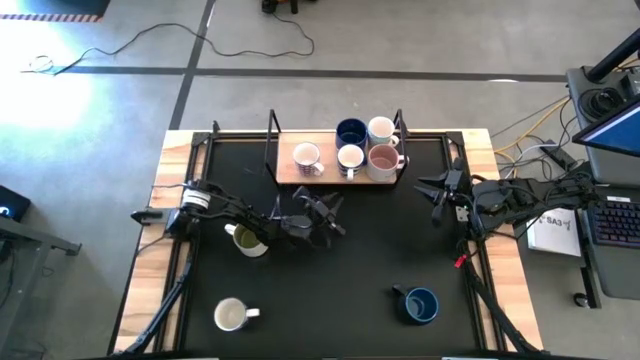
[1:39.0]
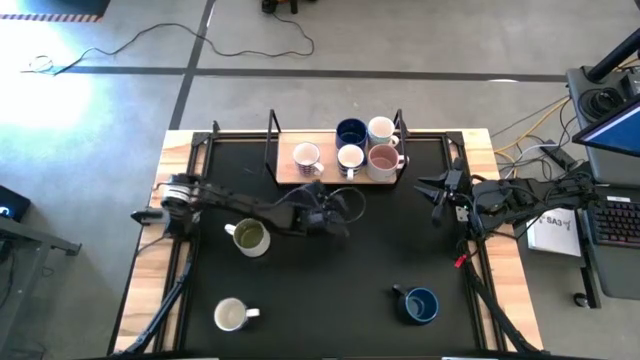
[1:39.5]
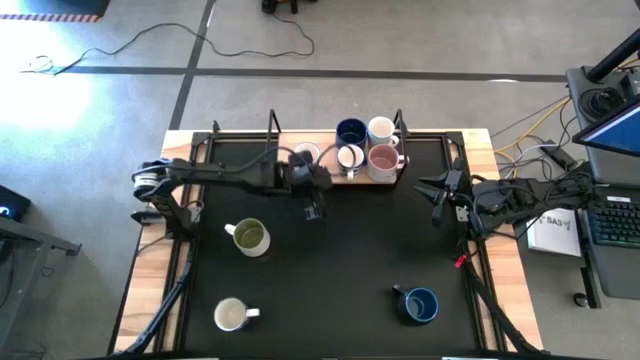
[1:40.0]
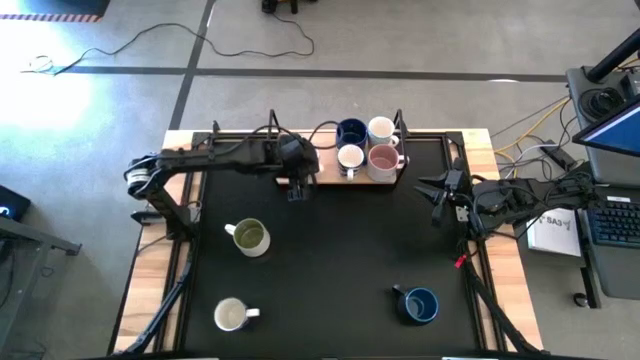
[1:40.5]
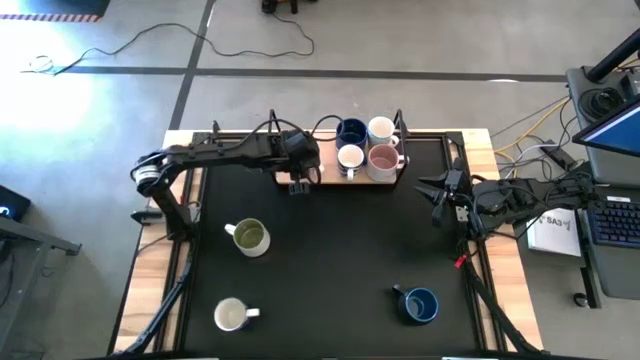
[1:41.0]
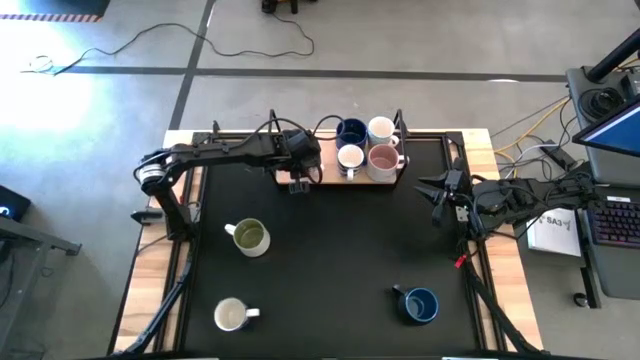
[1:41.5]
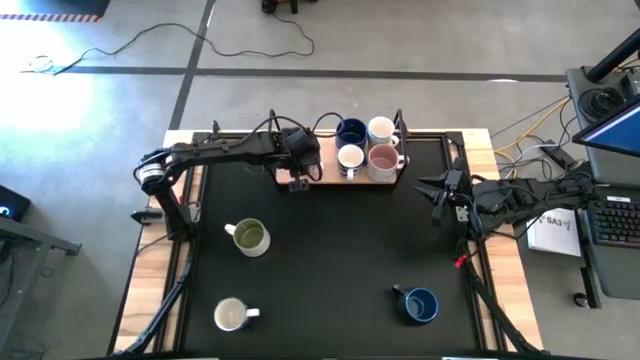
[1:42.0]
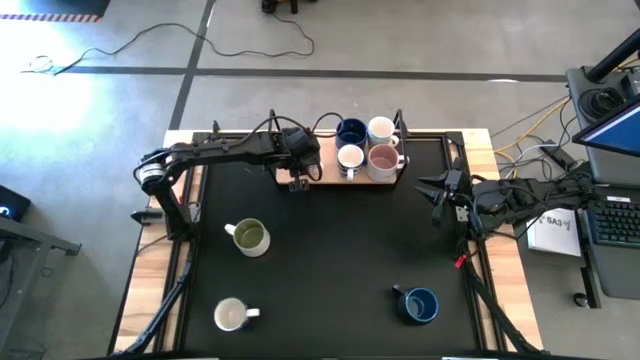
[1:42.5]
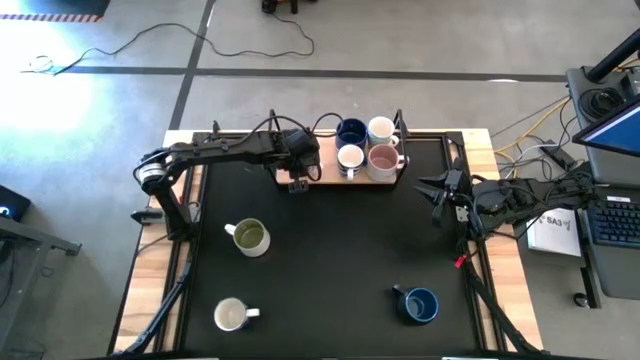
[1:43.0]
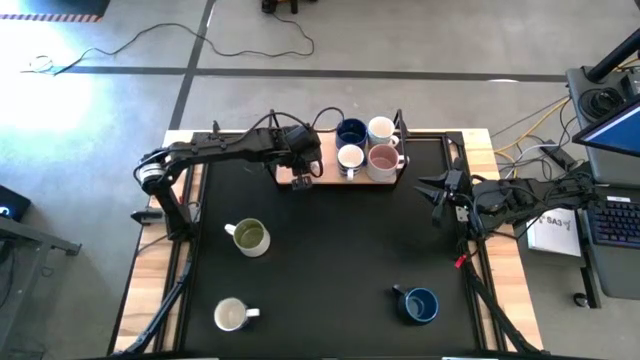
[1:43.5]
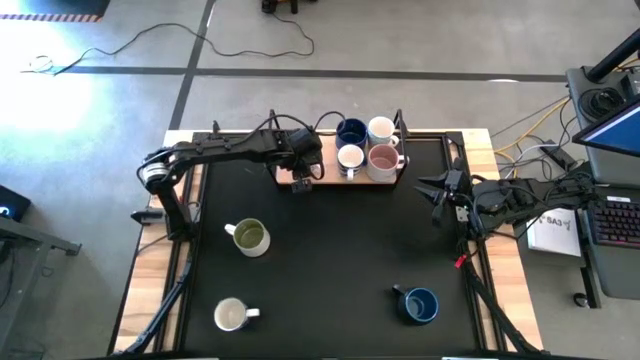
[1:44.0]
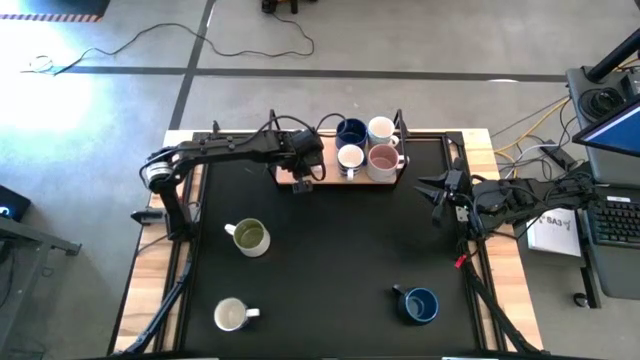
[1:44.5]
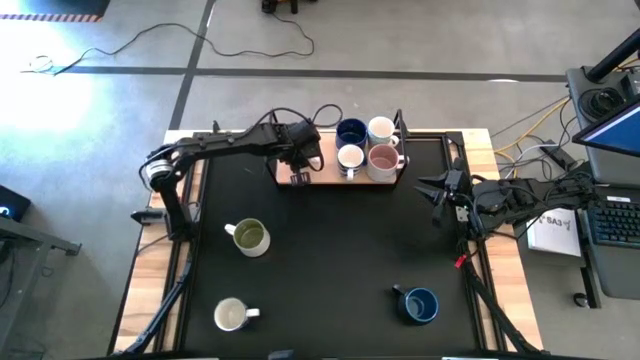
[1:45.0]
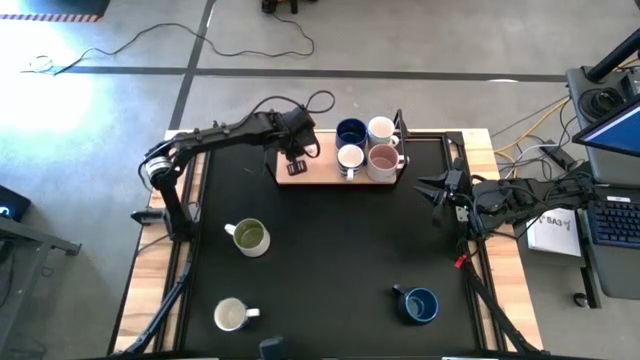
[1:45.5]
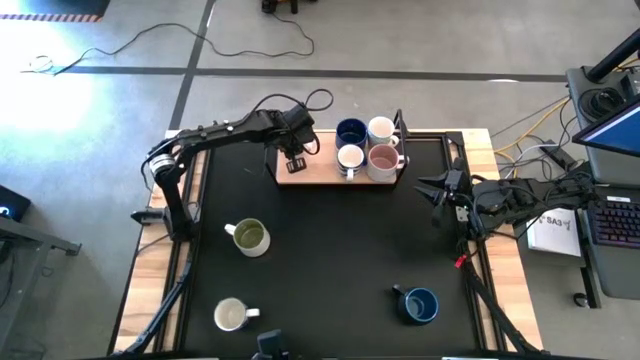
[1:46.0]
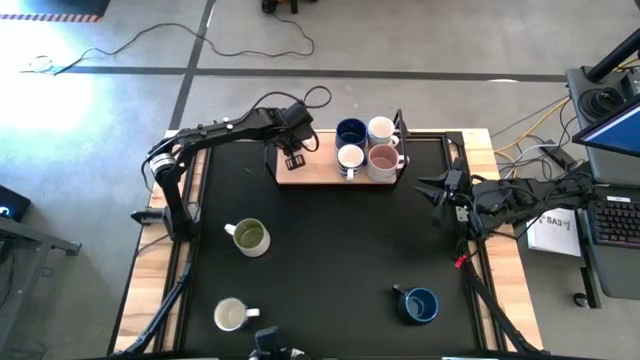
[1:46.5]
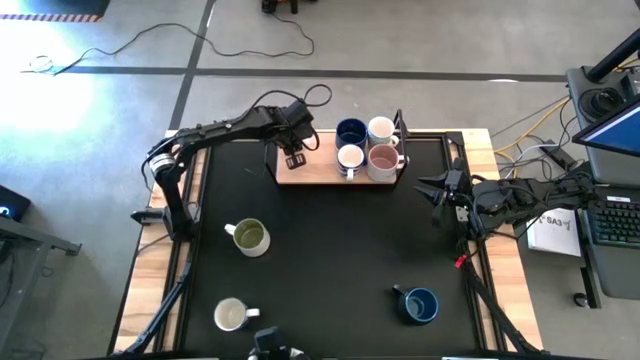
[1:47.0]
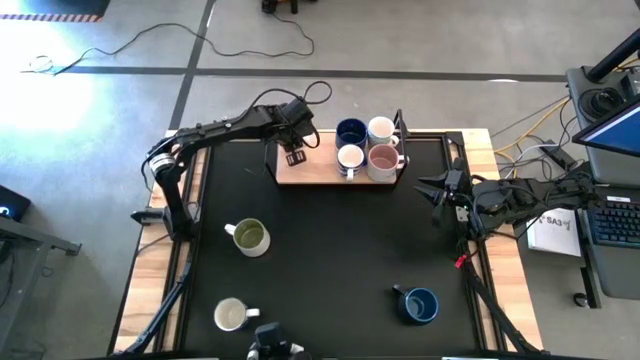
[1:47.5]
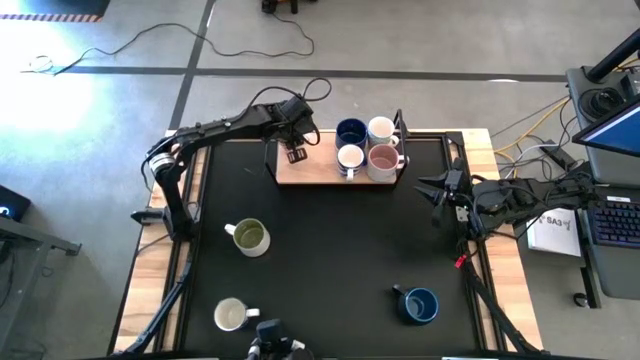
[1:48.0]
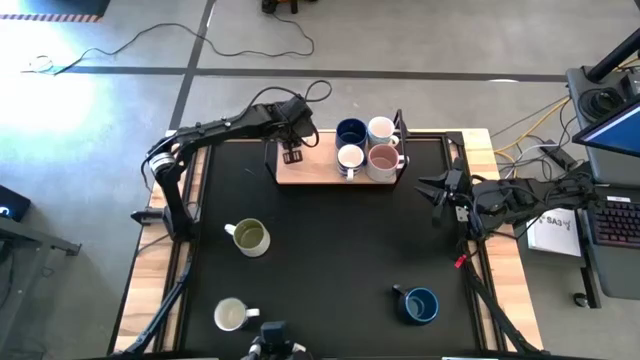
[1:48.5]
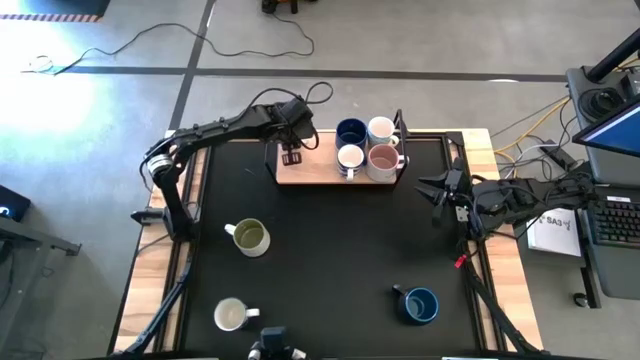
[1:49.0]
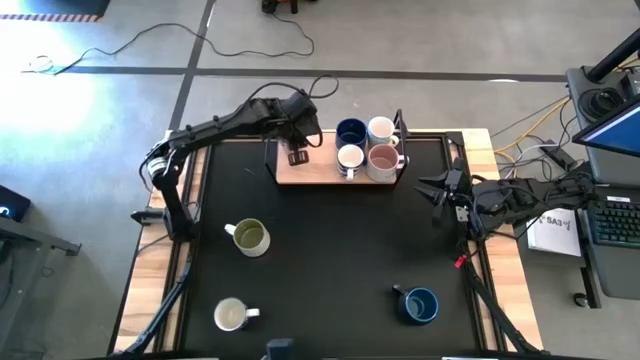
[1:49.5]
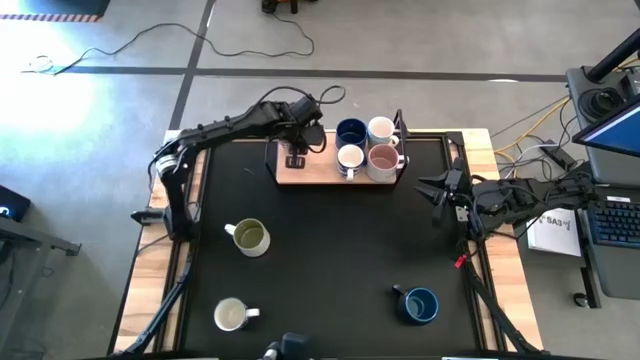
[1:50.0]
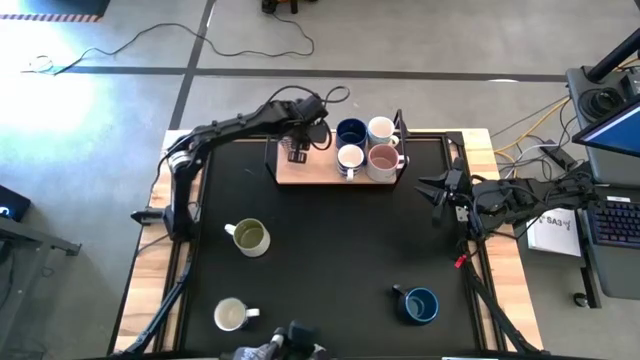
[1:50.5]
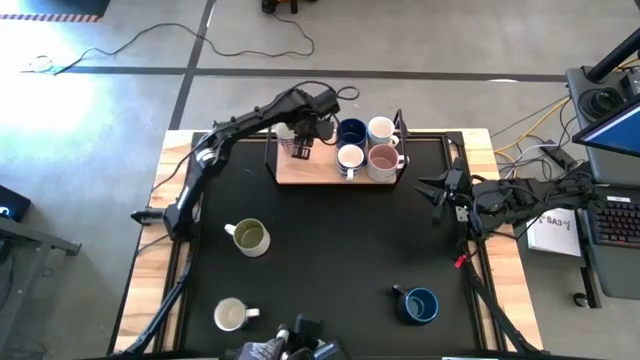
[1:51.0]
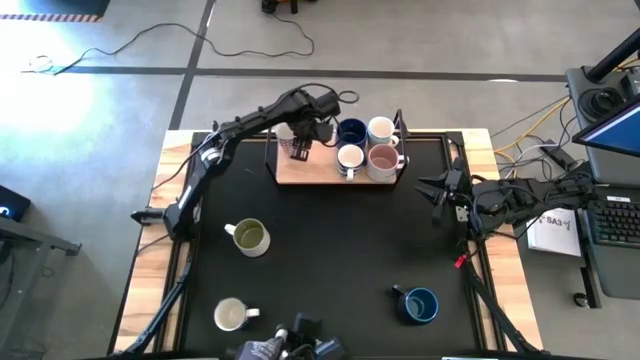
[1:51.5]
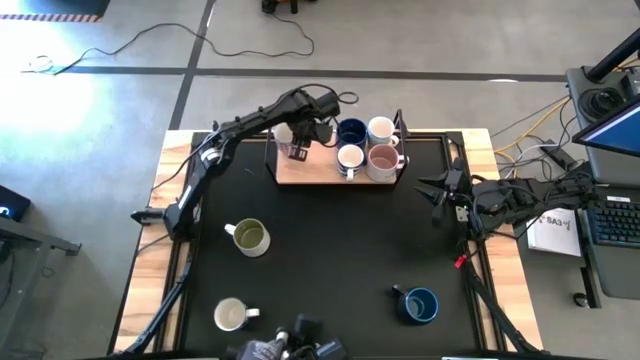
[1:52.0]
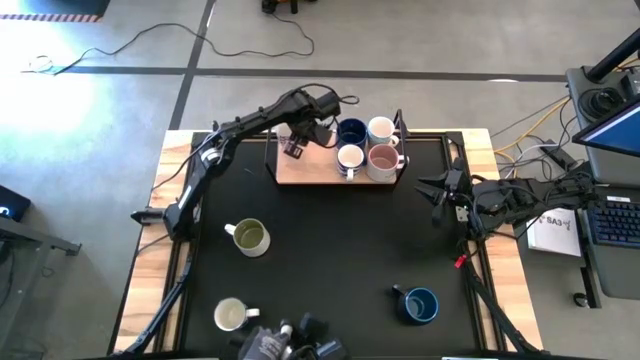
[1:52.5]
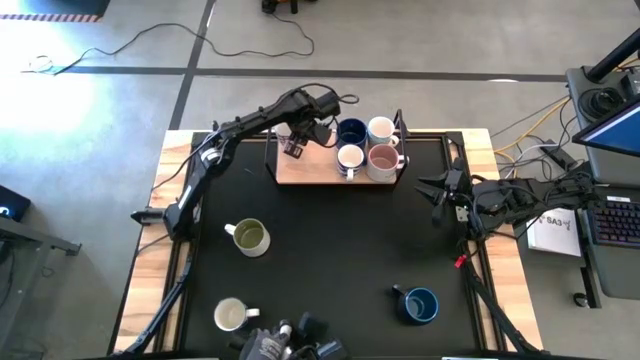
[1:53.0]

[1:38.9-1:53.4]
Task: Place coffee mugs
Put the red mug on the shelf

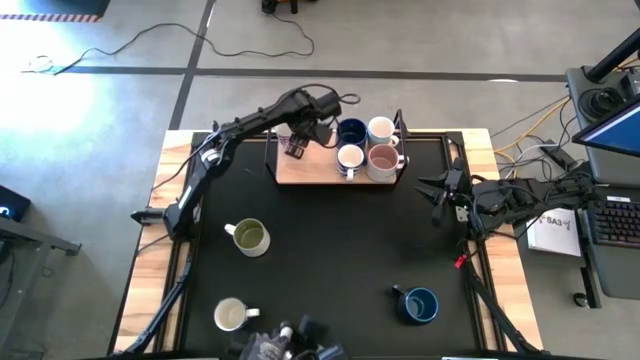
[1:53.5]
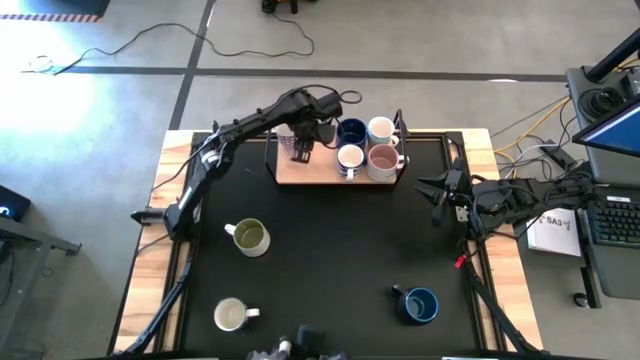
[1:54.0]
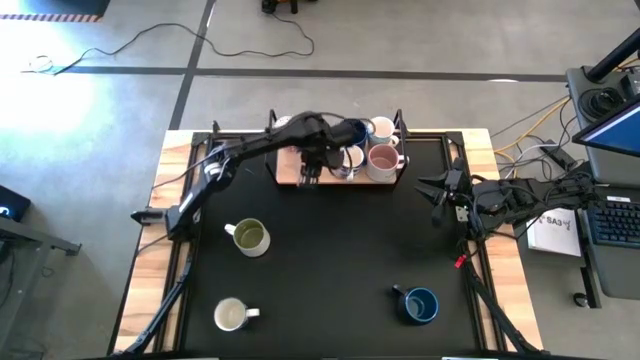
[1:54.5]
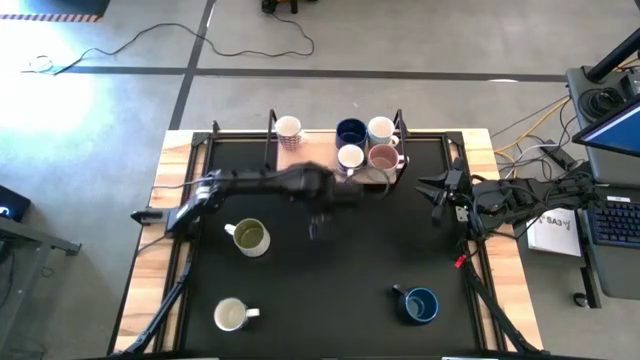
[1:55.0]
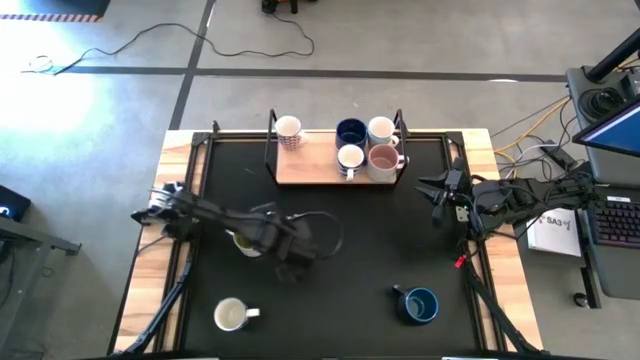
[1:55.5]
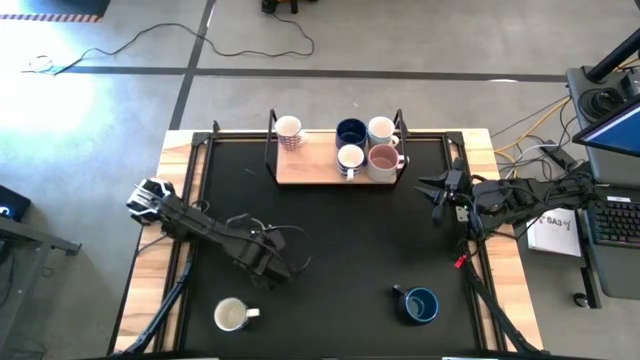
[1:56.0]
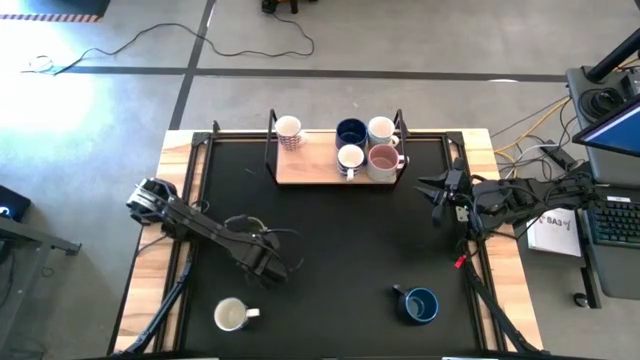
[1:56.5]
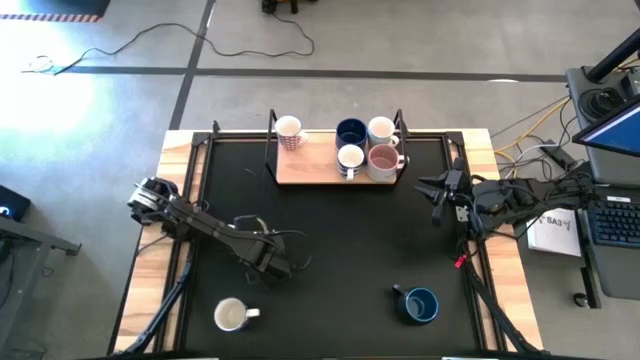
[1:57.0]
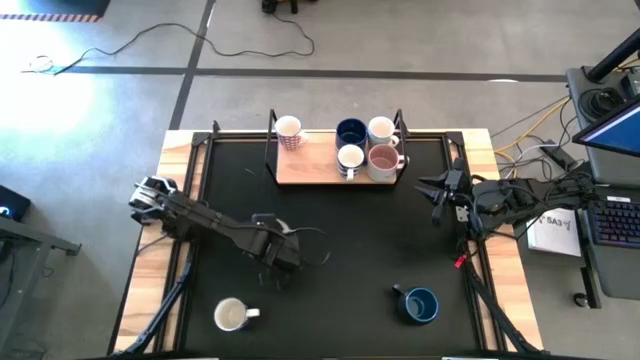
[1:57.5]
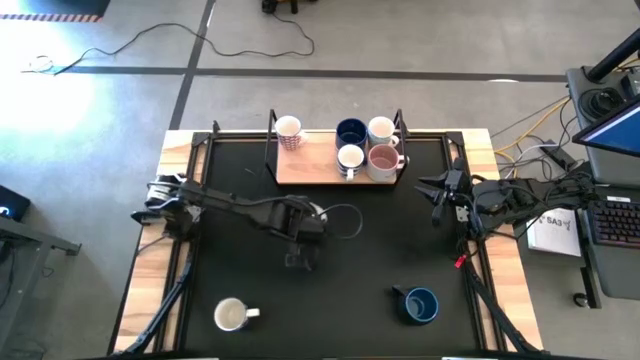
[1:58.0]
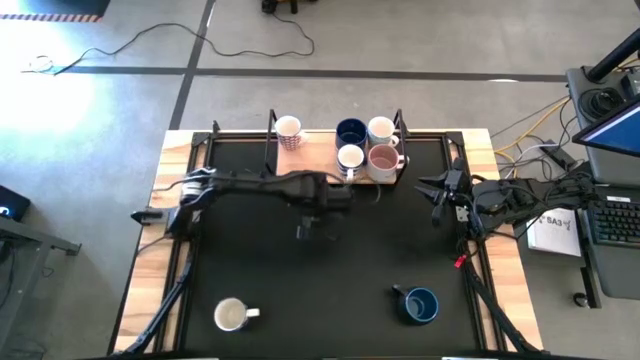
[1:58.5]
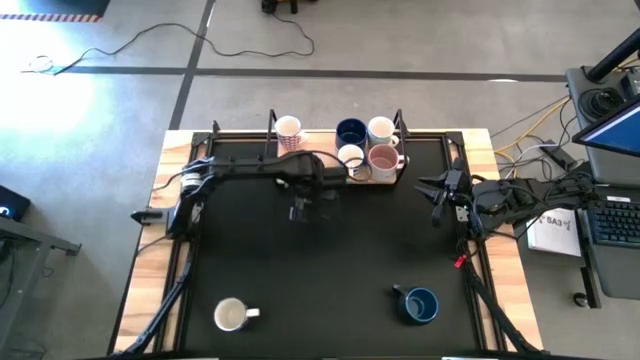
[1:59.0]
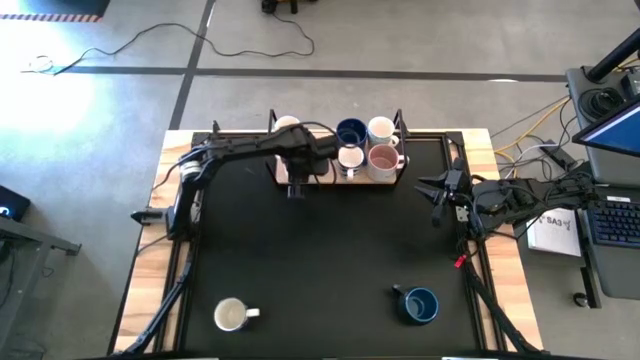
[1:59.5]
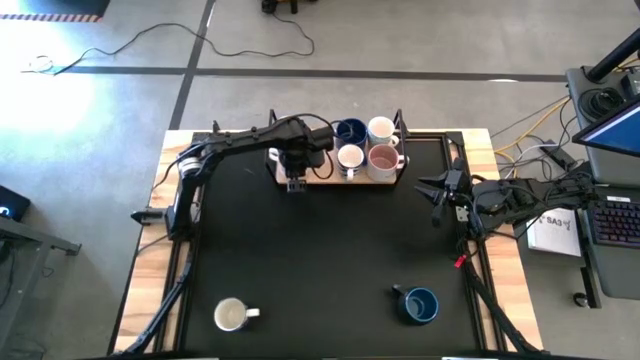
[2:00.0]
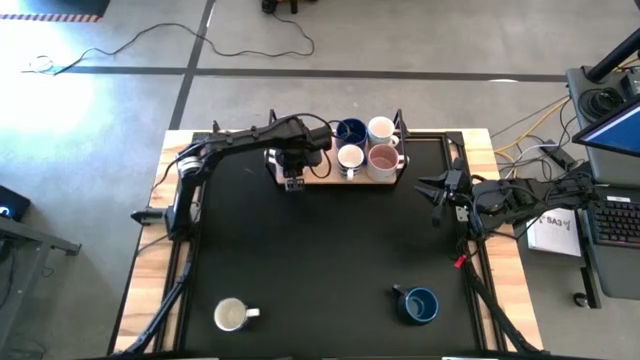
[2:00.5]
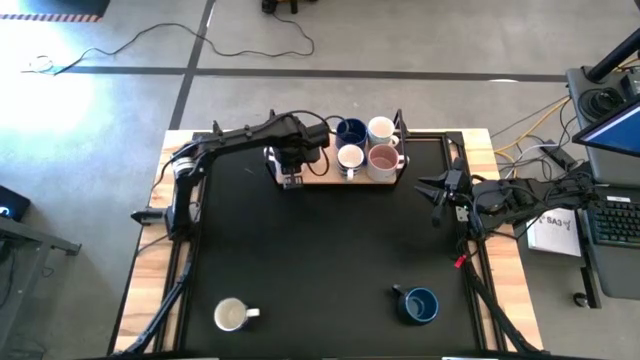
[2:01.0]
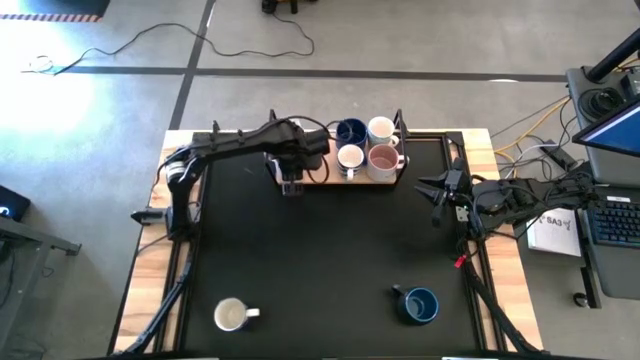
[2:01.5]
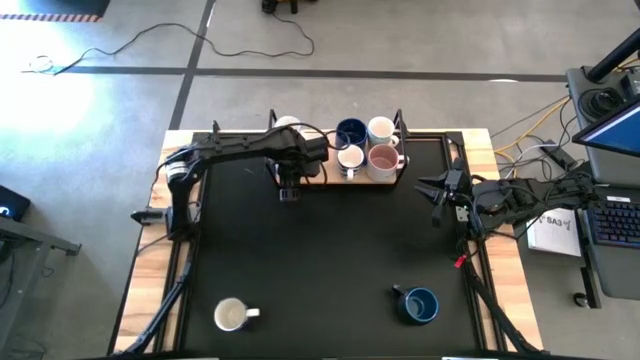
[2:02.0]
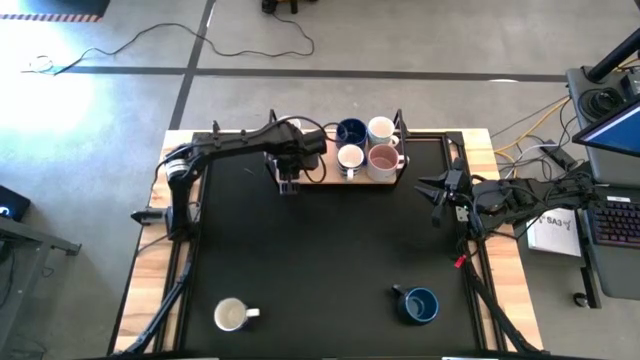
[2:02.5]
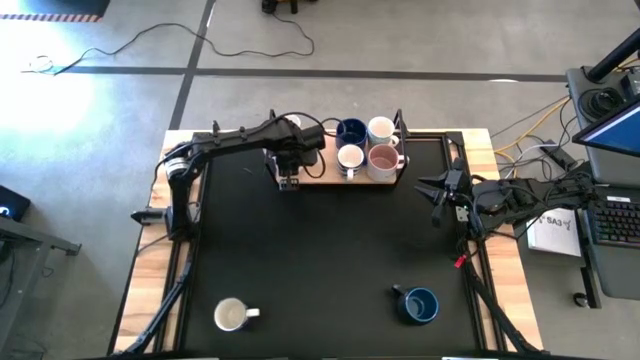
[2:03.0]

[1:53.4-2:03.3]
Put the green mug on the shelf aligned with the other red mug
